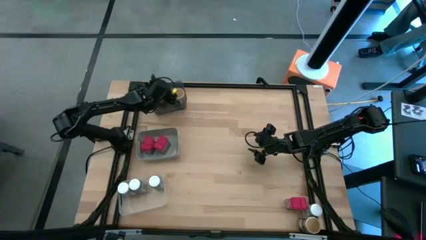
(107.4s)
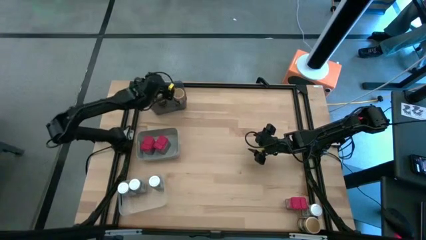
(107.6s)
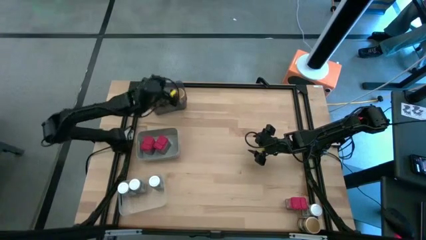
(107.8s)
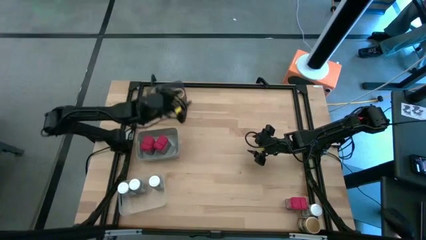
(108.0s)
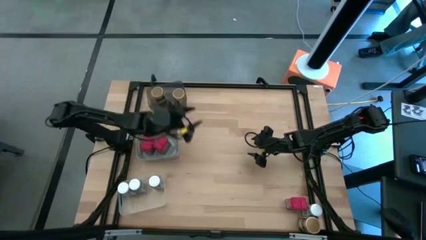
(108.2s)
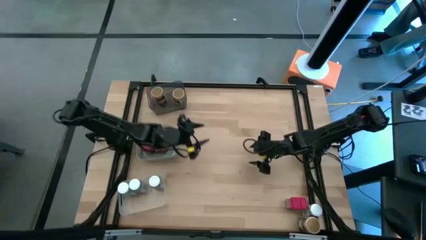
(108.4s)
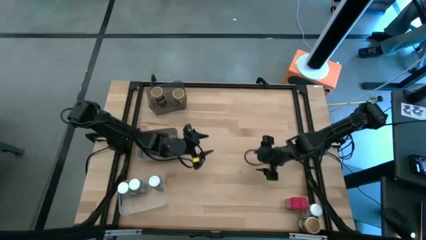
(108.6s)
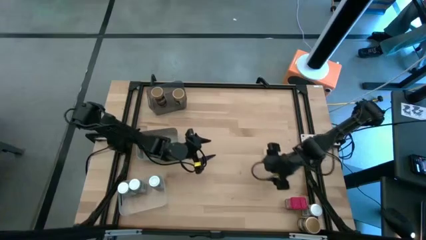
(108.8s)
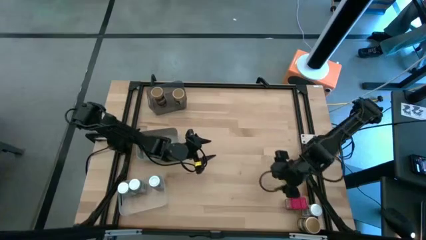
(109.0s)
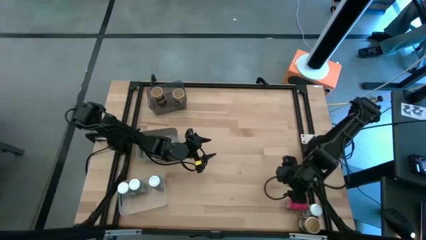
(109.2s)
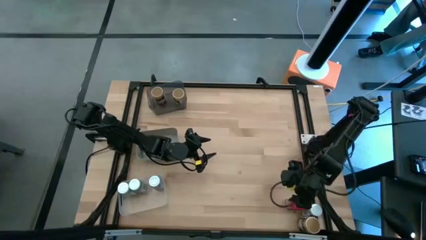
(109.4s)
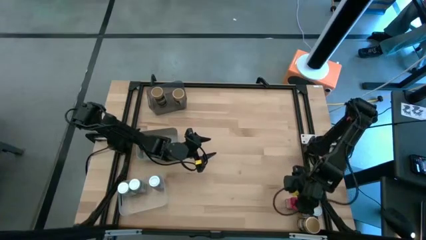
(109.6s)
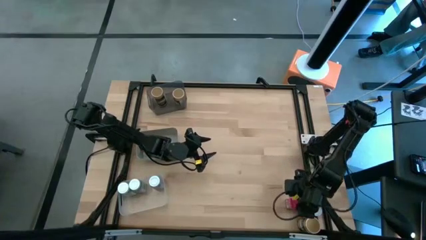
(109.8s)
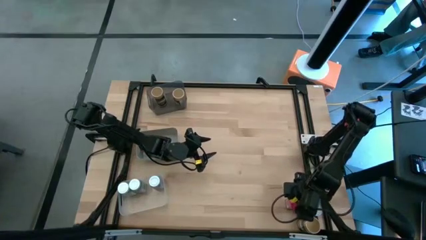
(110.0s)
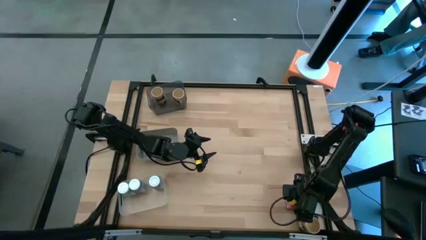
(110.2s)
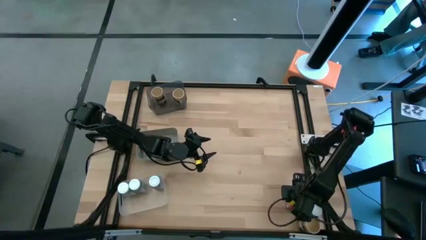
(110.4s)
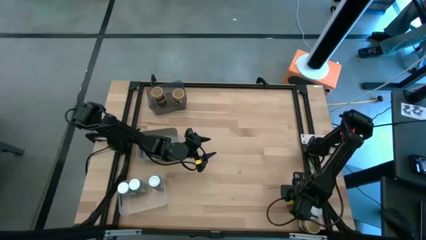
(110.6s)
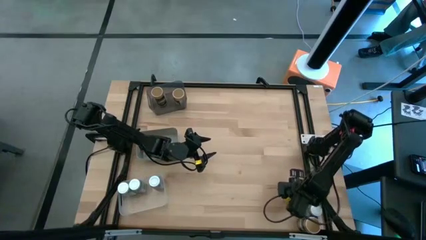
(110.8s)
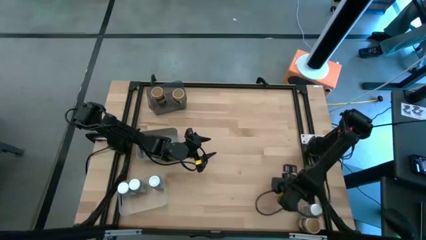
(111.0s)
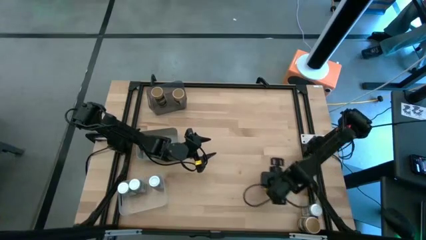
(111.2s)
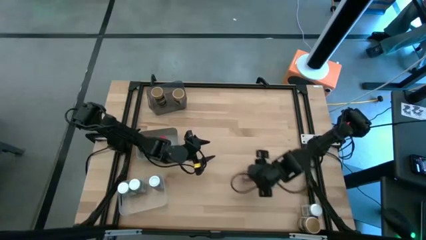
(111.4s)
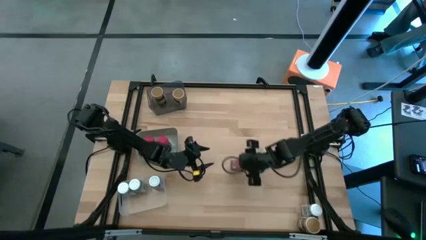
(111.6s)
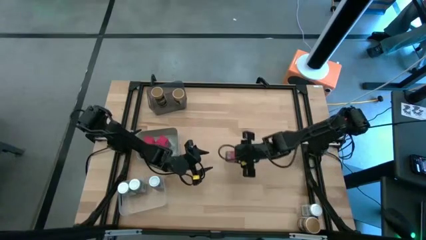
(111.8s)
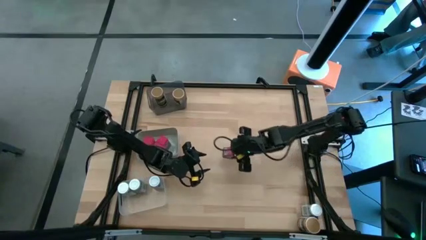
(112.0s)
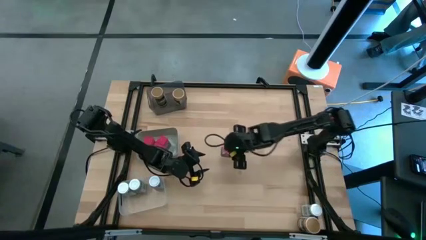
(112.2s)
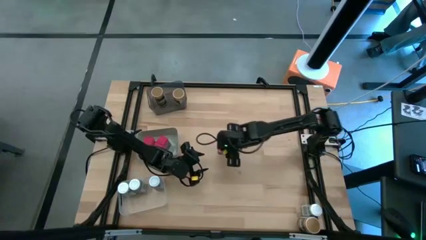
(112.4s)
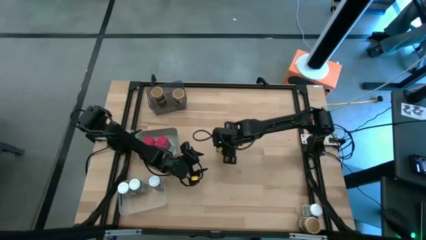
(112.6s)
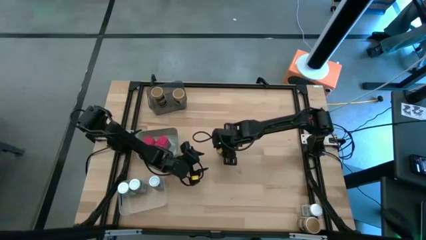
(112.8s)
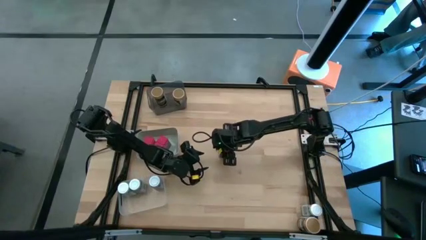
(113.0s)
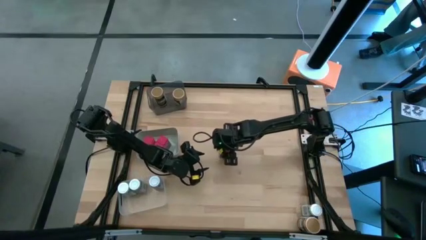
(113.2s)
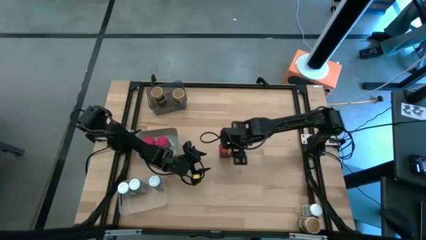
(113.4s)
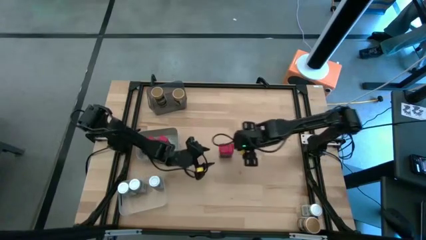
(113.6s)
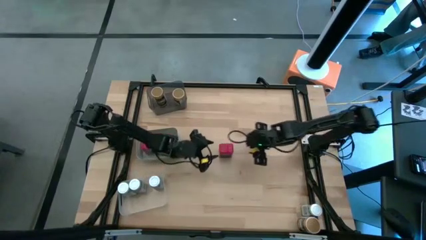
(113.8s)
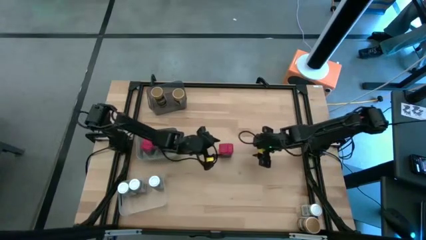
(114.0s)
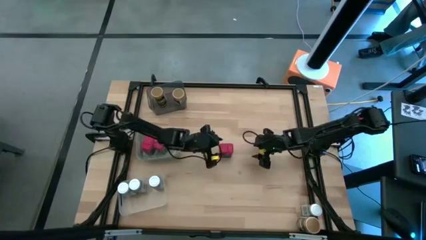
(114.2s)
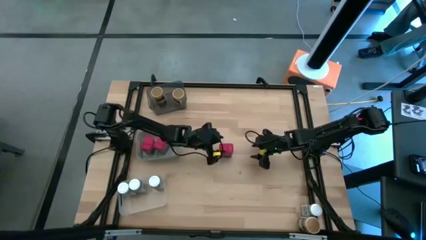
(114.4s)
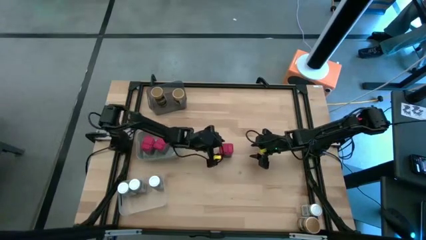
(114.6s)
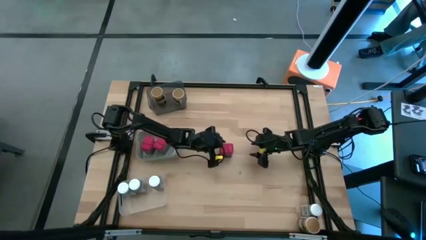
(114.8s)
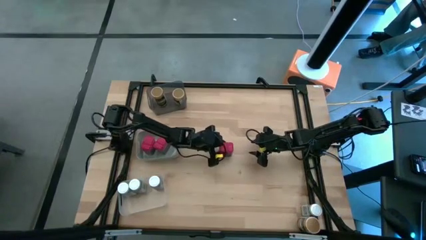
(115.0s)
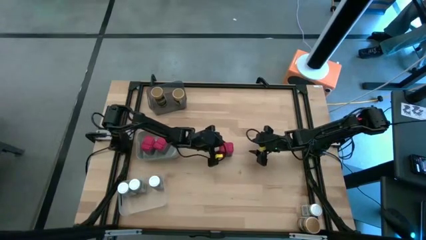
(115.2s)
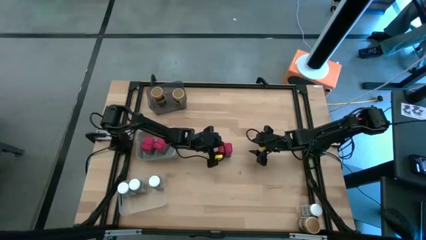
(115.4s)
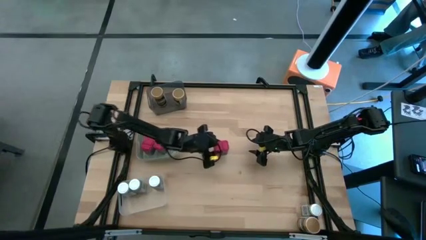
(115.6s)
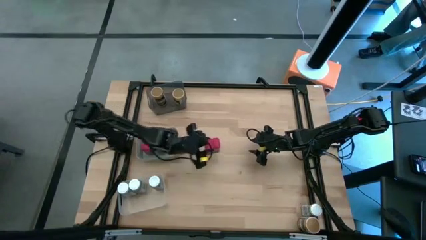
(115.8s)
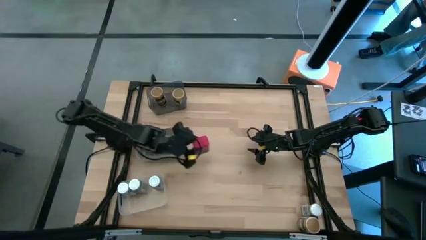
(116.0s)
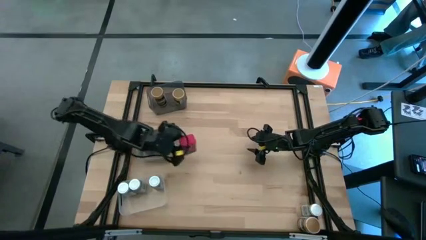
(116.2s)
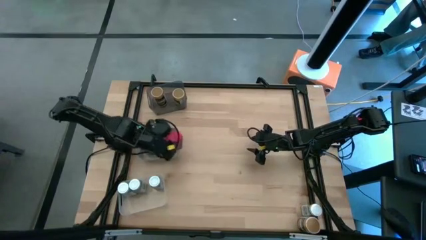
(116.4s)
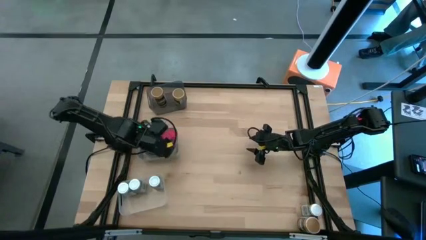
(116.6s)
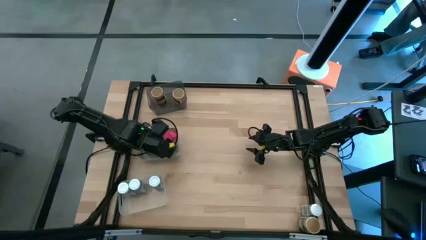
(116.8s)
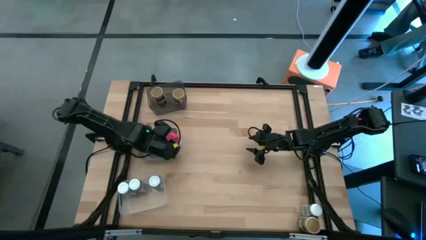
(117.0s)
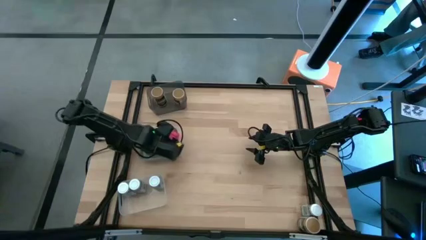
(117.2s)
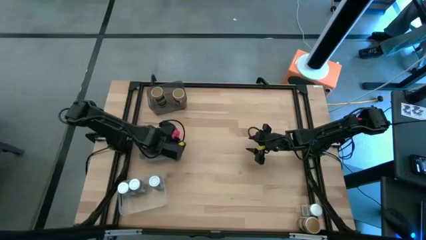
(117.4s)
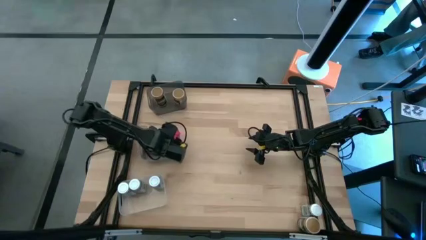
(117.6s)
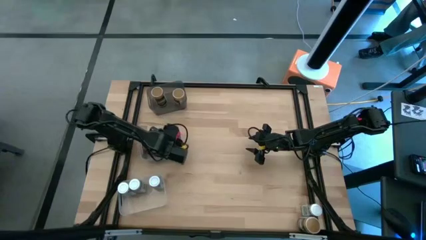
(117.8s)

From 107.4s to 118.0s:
Task: Sort spices by type
Put the red seasoning can into the gray bin

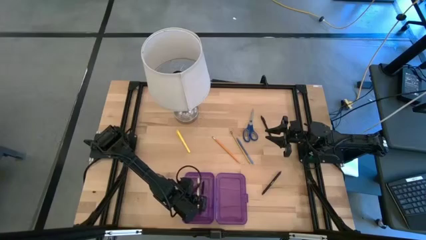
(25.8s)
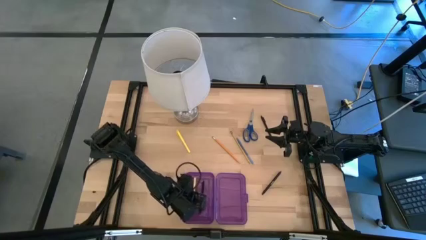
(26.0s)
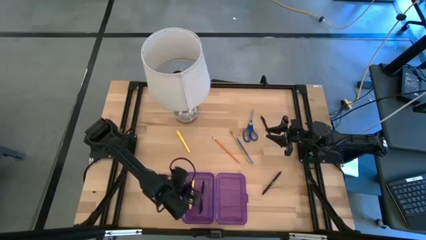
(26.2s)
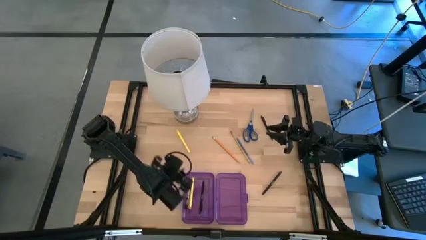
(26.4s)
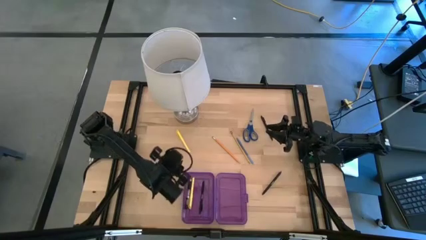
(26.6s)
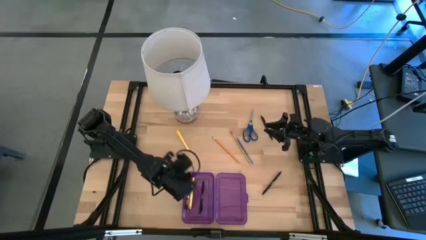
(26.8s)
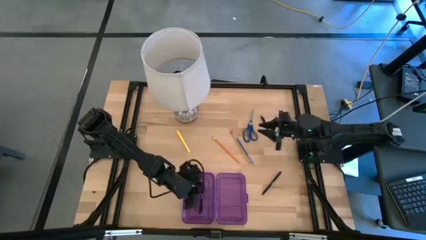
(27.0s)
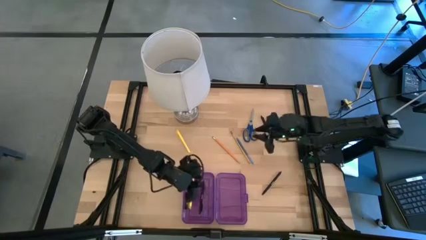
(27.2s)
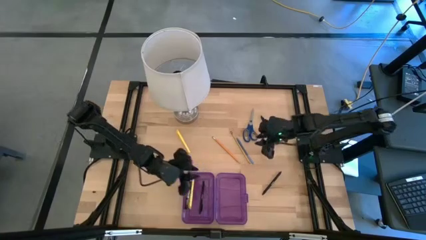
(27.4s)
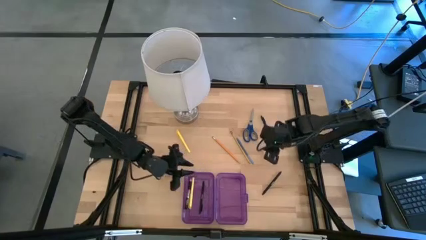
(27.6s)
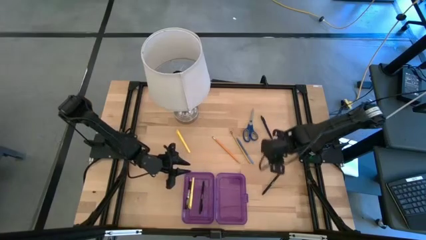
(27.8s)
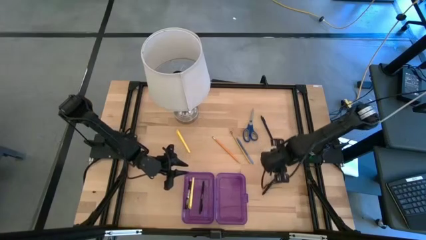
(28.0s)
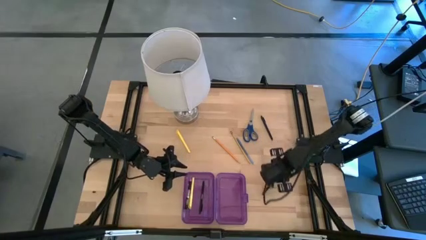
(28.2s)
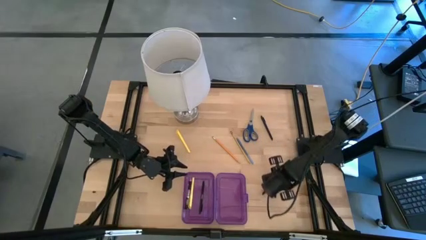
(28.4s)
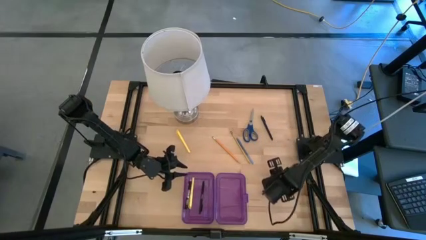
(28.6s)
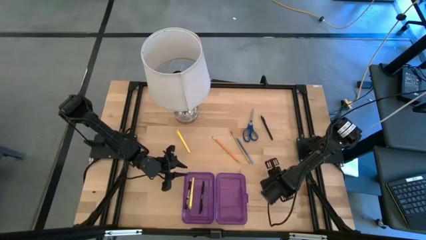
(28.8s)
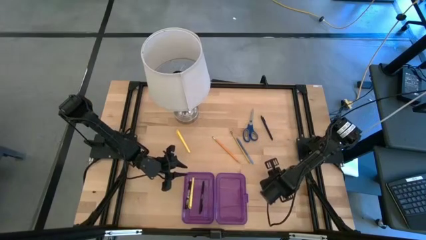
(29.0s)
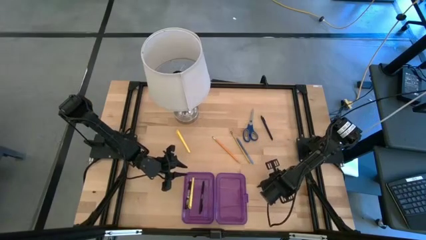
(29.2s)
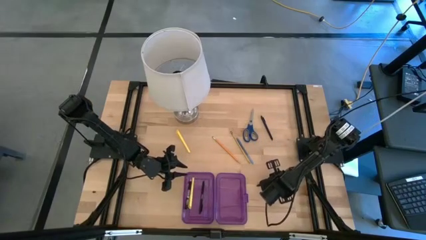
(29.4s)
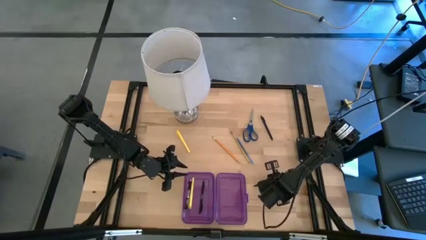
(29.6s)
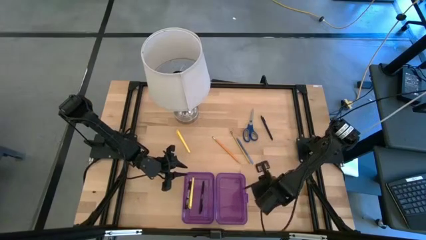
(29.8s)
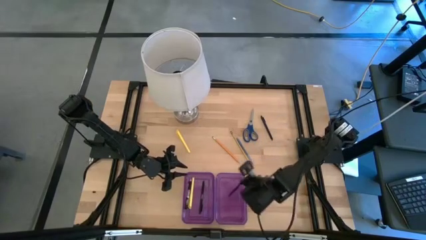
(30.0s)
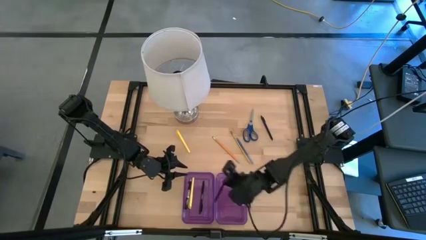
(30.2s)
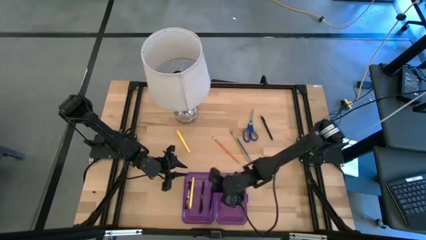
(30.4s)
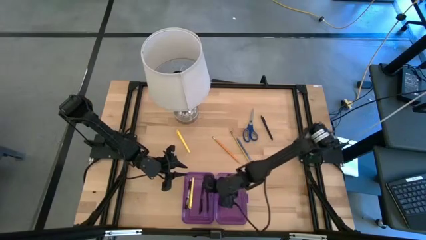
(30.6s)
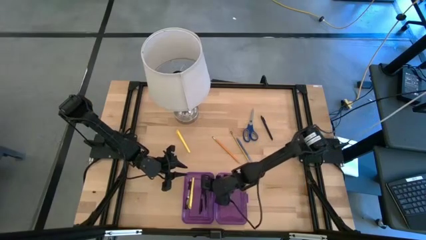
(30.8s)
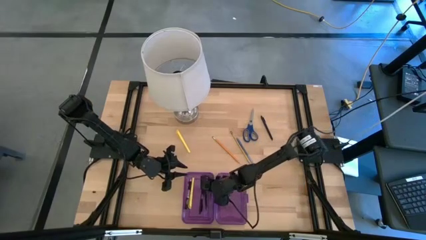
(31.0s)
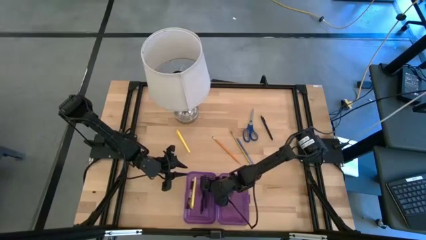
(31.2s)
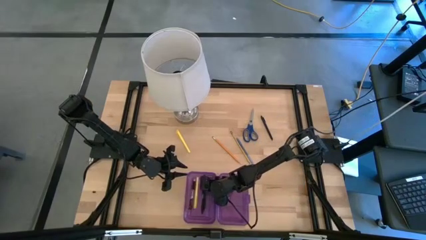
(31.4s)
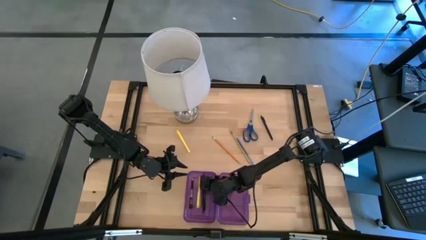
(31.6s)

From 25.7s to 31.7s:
Task: Pick & place school supplies into a supply box
Put the bottom black pen into the violet supply box
